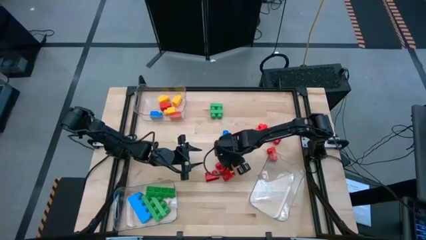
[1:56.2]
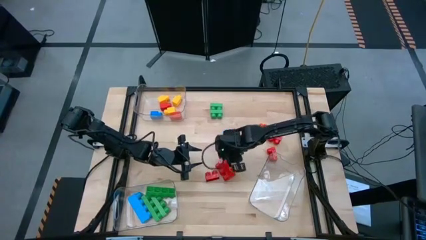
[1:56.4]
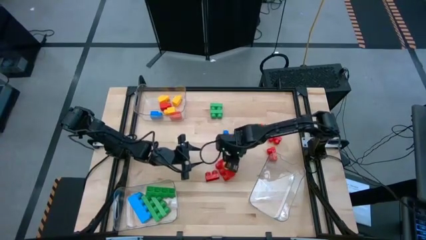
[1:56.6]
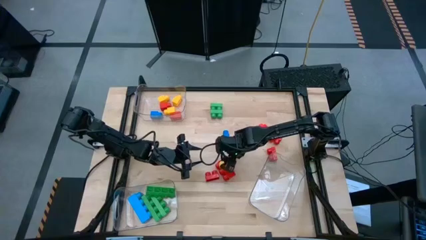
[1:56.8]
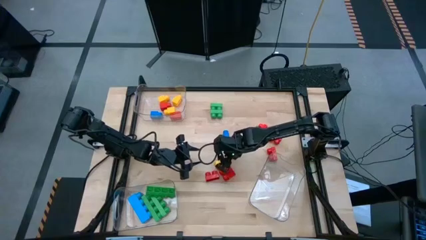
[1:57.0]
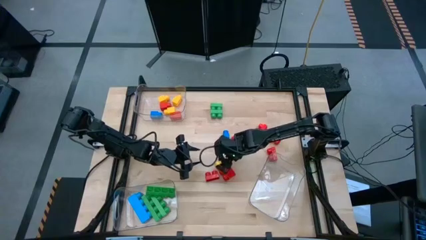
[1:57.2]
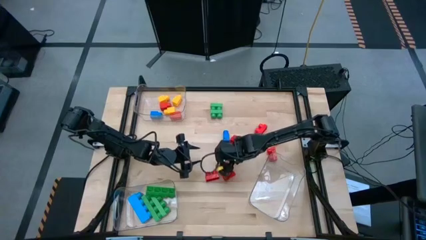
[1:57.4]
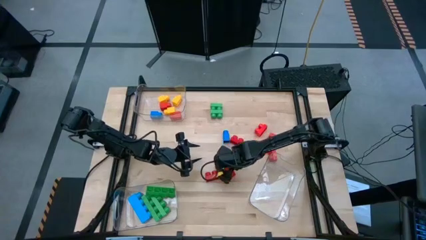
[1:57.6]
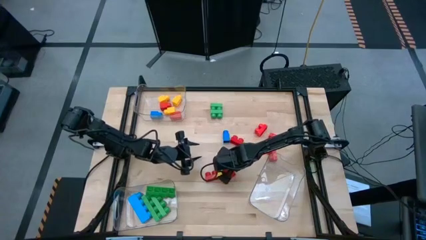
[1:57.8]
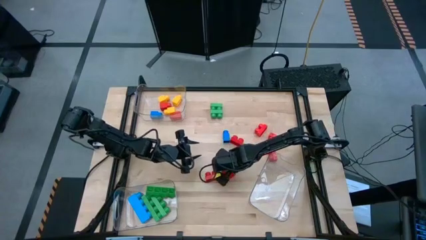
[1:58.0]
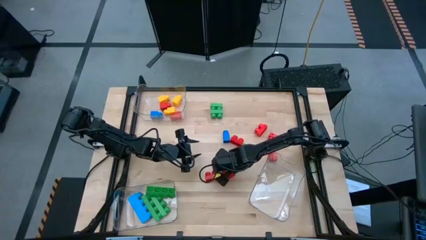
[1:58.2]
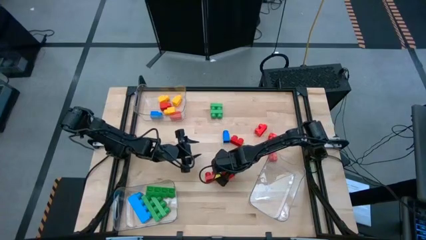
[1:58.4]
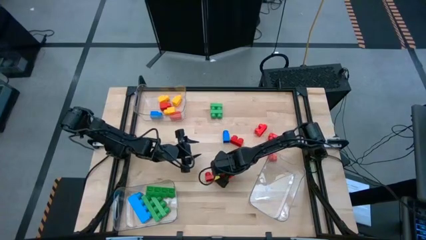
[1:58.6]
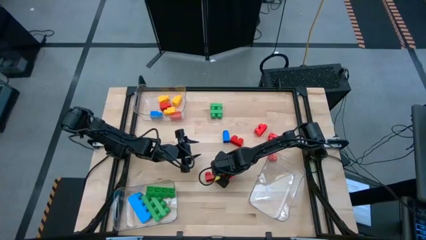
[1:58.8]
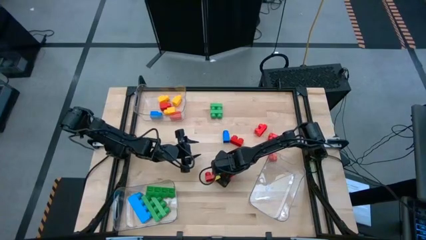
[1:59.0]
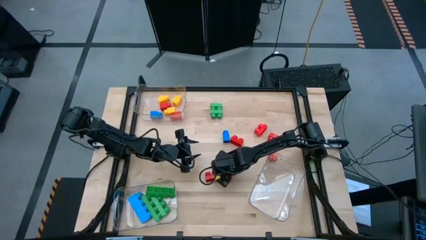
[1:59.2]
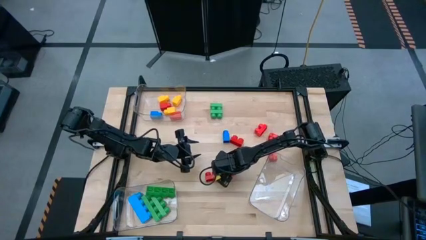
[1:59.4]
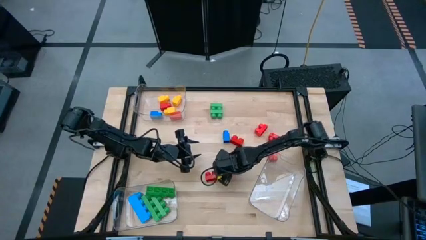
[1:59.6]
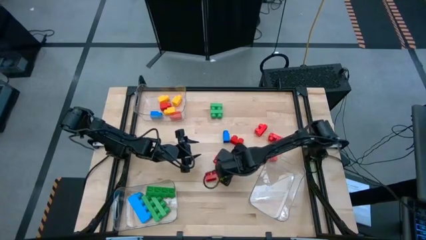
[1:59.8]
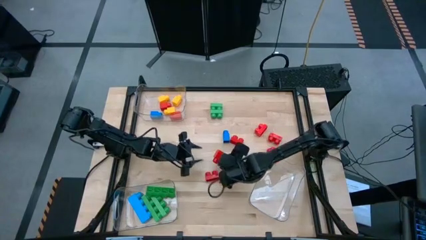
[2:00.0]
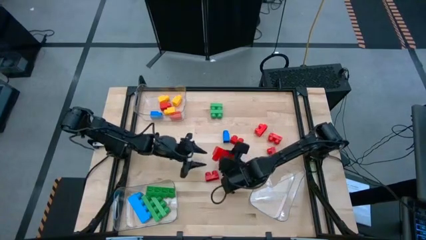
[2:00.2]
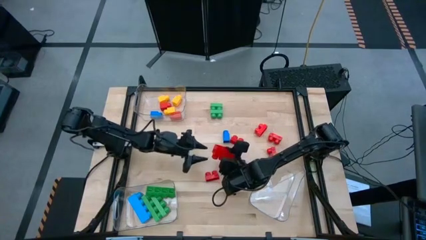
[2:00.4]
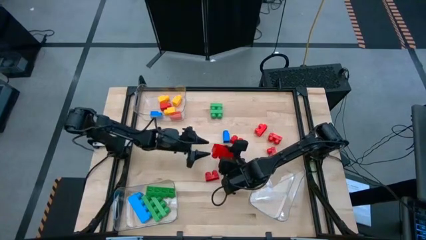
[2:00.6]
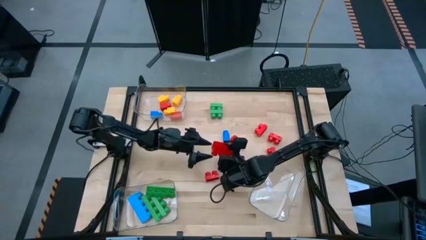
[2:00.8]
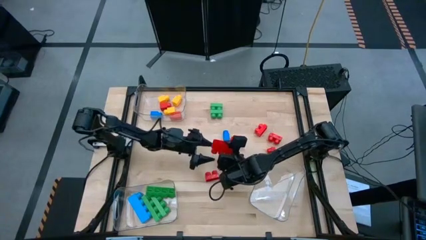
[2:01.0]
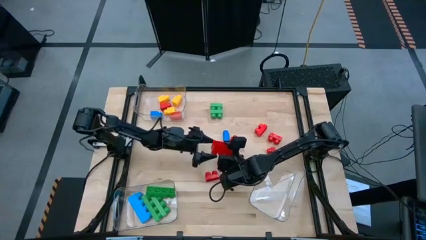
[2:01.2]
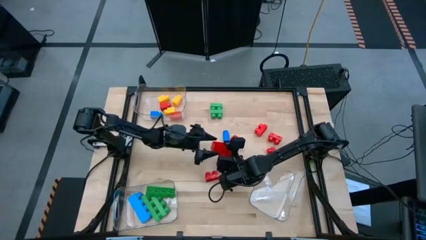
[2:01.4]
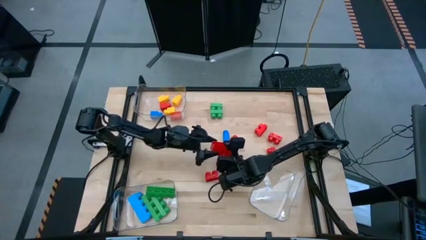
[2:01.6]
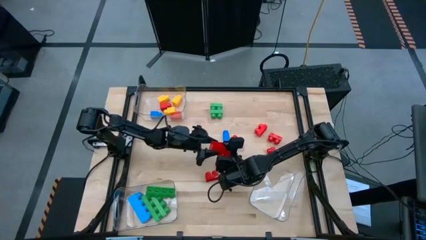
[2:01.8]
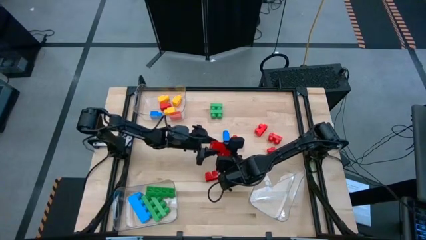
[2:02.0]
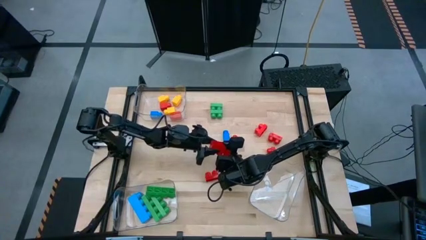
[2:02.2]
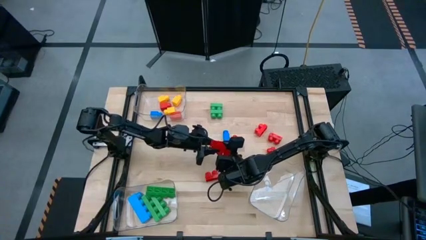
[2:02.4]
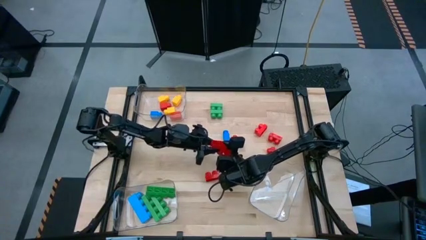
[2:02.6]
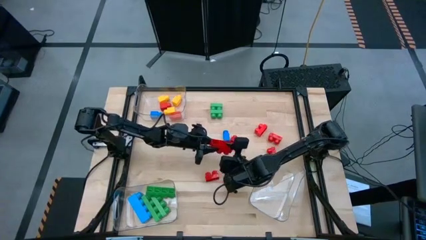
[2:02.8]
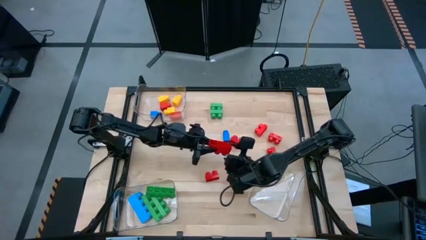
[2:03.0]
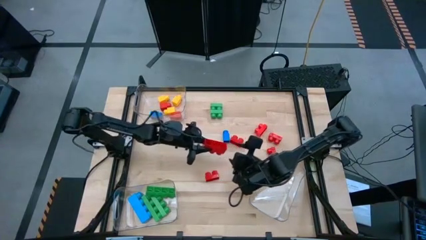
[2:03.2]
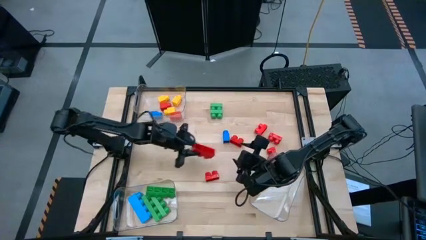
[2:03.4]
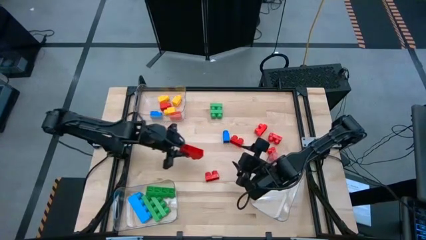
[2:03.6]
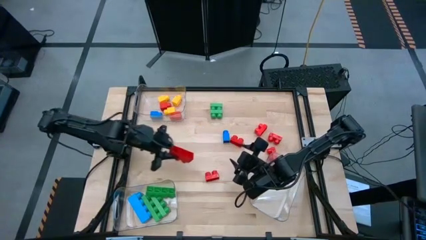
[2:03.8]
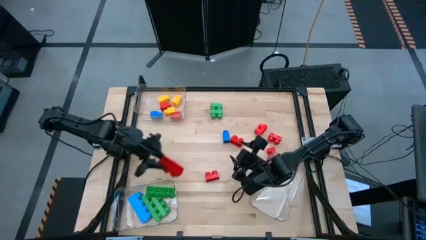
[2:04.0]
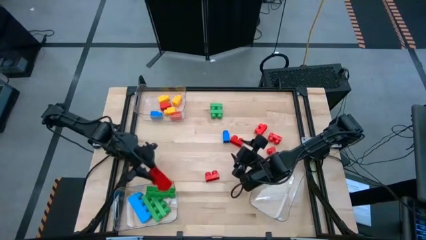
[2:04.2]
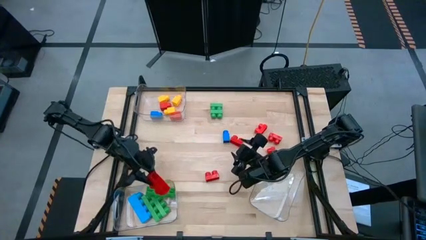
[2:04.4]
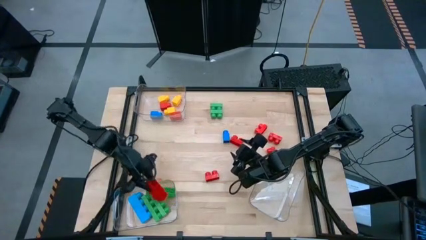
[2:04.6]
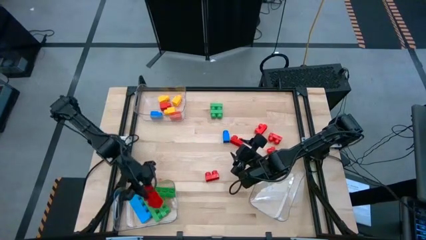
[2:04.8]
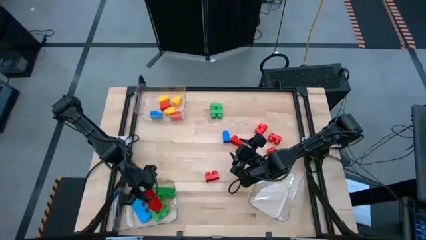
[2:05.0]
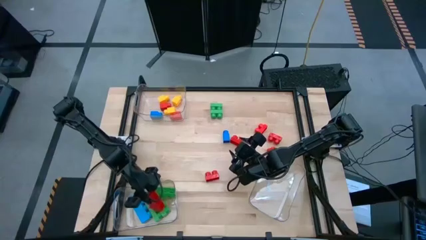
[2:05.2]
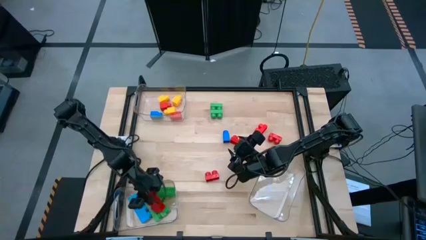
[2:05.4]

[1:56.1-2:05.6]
Task: Sort blocks by size
Put the three-stud red game piece into the bottom left transparent bin

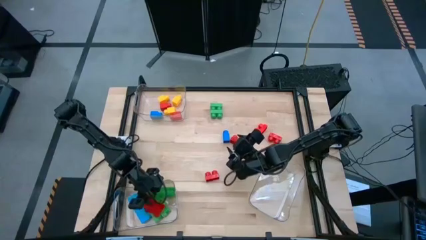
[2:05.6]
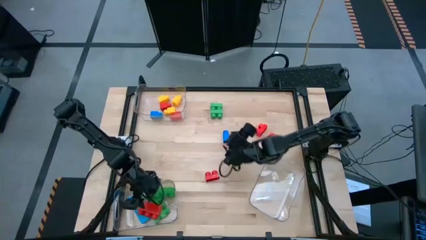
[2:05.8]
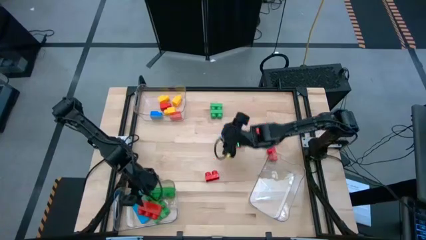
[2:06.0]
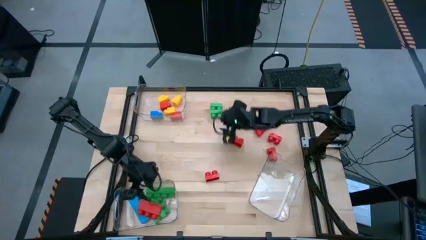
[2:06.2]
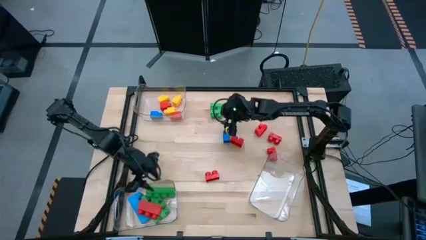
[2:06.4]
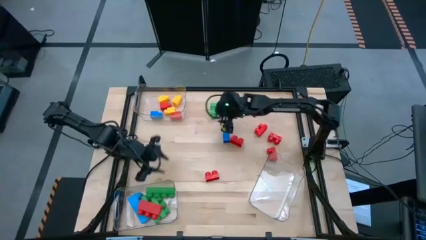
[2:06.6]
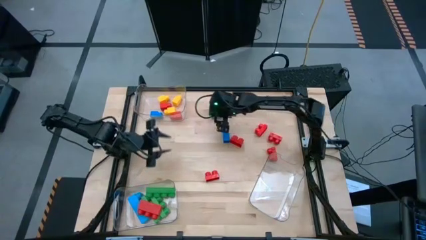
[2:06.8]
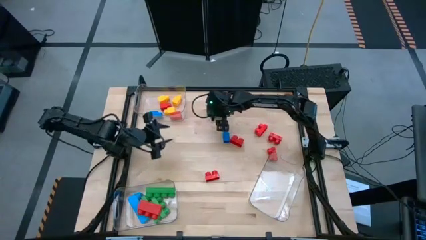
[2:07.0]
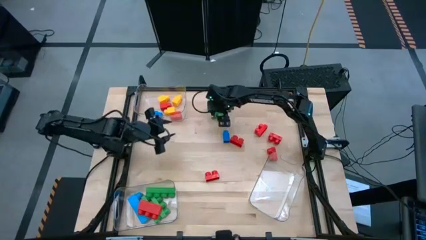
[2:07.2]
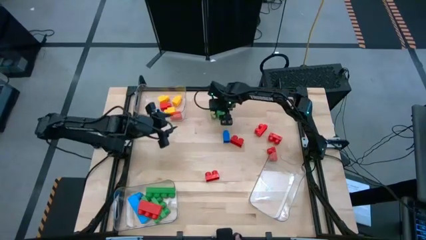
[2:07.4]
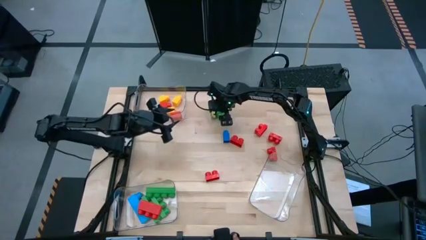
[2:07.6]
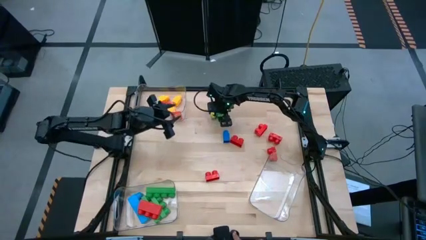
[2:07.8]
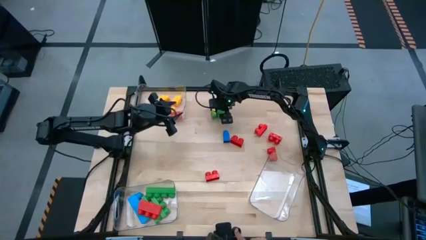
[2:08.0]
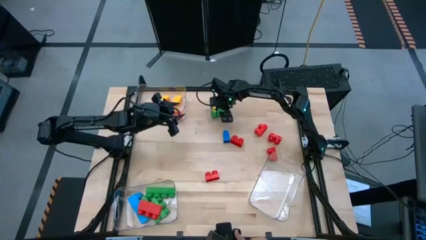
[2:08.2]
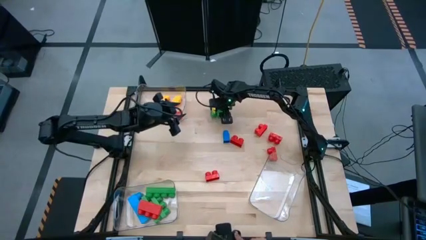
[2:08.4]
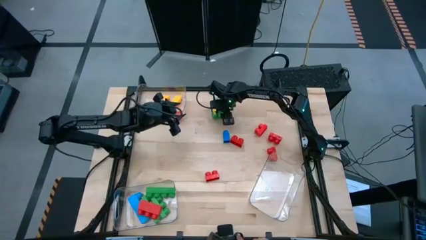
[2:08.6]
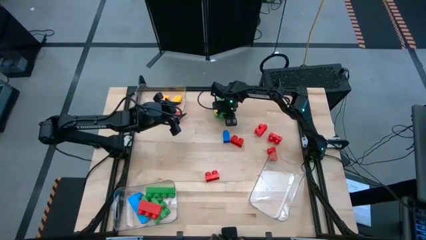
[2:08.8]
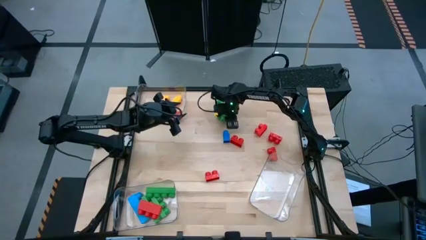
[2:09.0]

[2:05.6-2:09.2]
Put the two-stud green game piece into the bottom right transparent bin

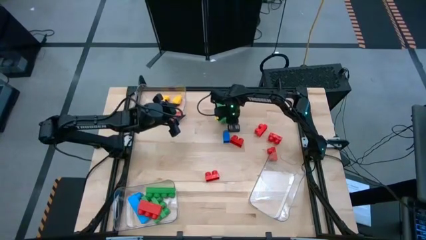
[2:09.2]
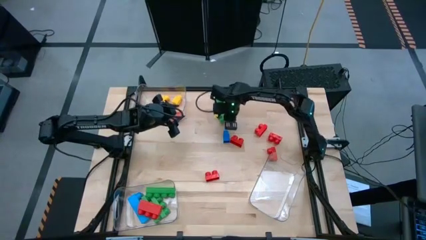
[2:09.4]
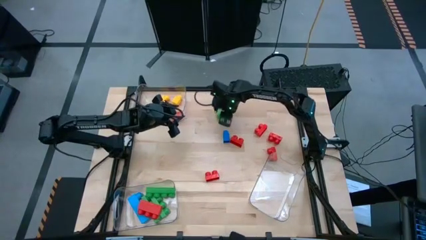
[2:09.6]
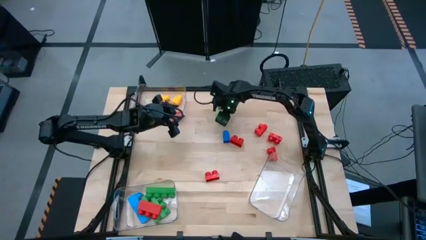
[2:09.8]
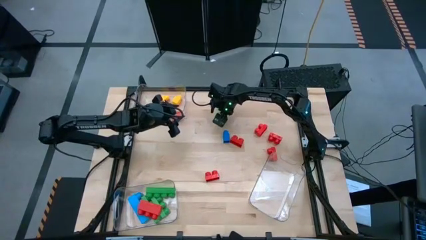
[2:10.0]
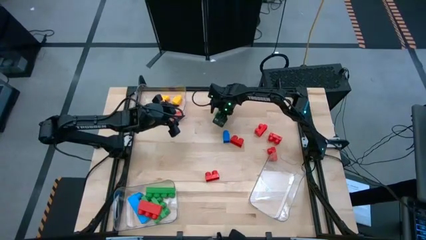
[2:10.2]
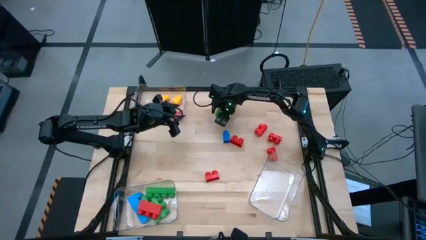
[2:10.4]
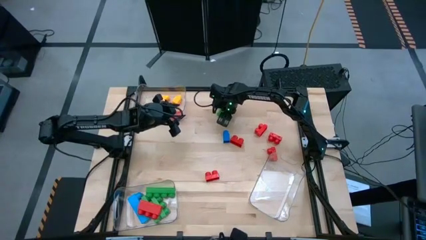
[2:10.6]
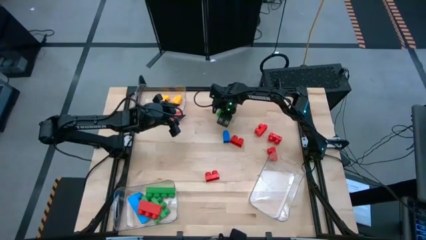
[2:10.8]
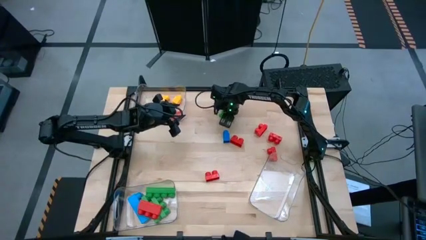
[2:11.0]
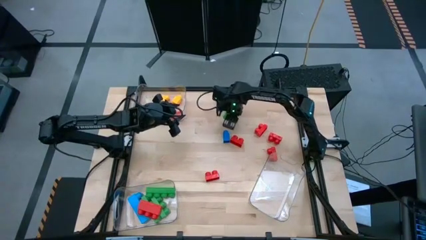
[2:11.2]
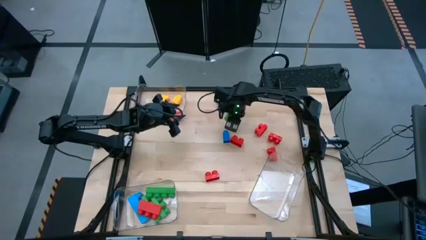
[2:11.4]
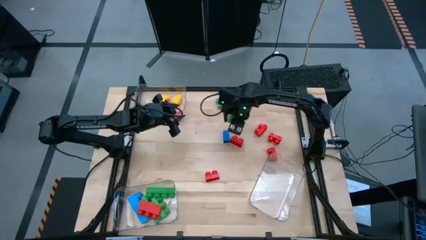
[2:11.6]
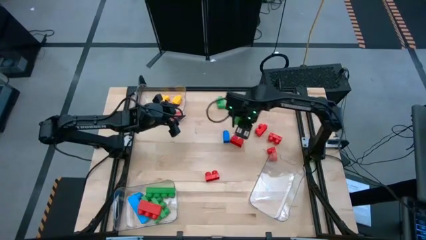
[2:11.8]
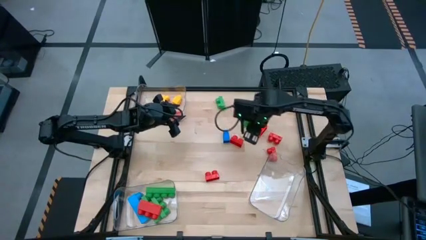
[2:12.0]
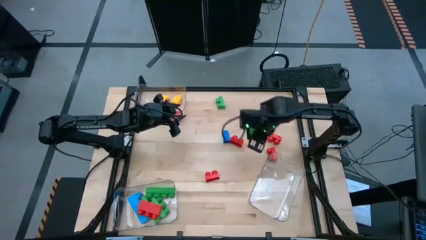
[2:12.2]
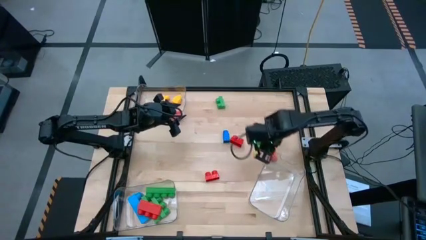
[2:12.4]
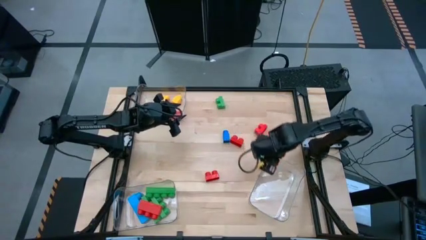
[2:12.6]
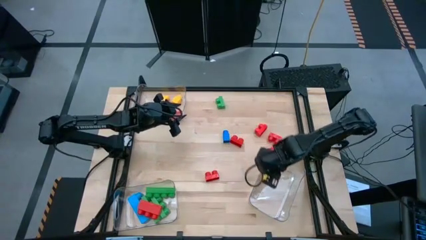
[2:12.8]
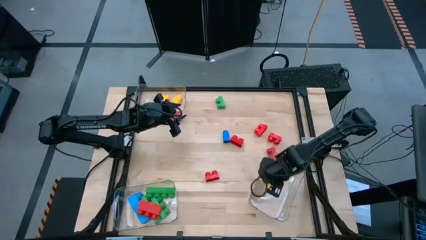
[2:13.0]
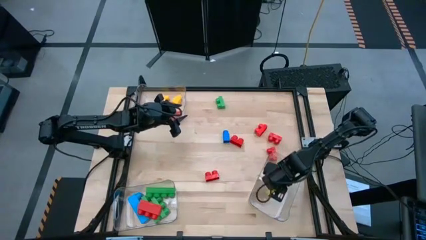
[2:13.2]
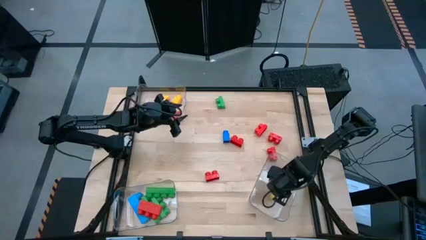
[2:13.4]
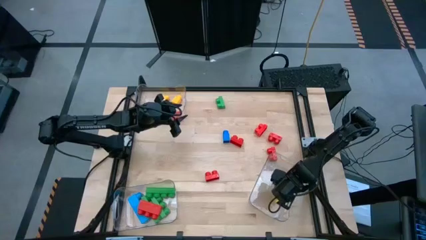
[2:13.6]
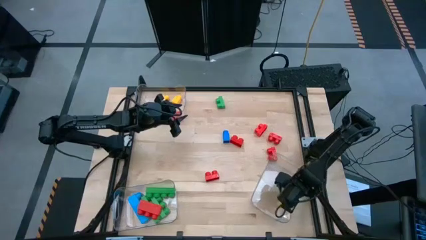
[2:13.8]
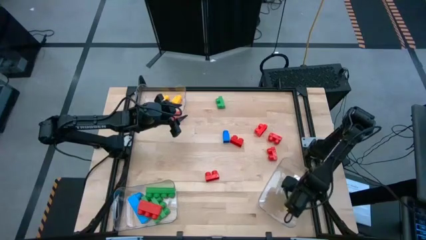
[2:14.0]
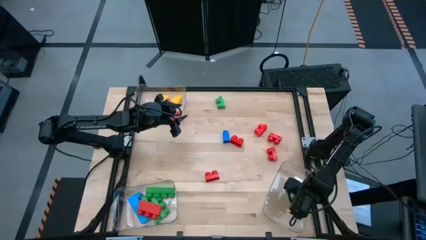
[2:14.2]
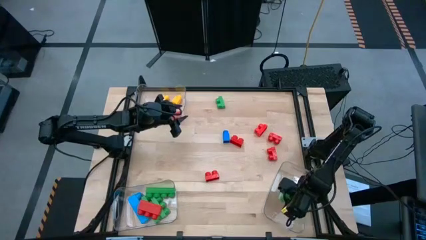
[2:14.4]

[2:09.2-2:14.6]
Put the two-stud green game piece into the bottom right transparent bin
